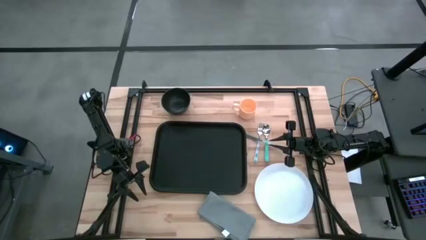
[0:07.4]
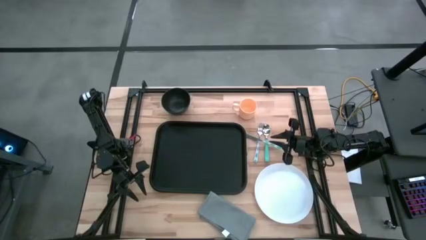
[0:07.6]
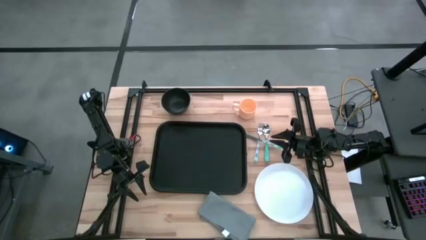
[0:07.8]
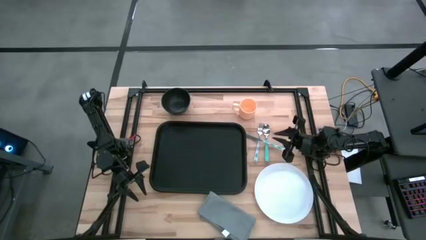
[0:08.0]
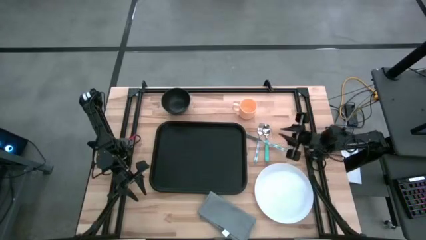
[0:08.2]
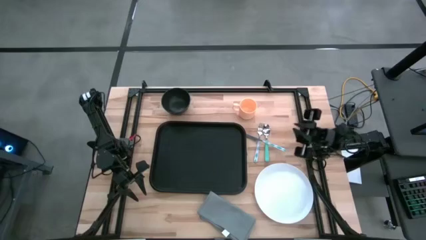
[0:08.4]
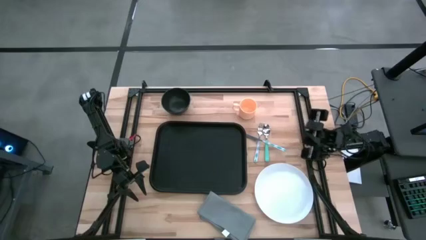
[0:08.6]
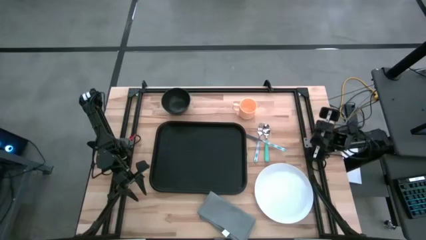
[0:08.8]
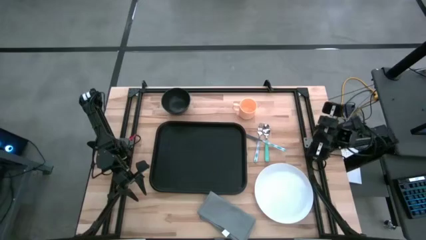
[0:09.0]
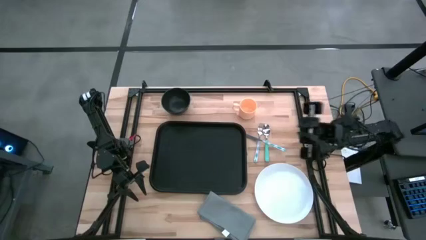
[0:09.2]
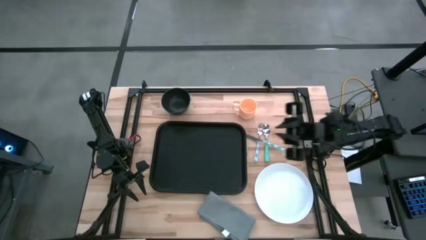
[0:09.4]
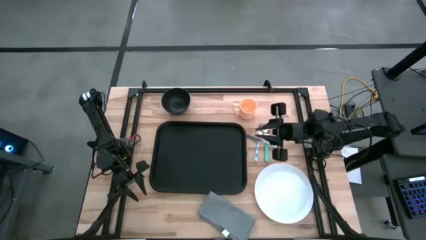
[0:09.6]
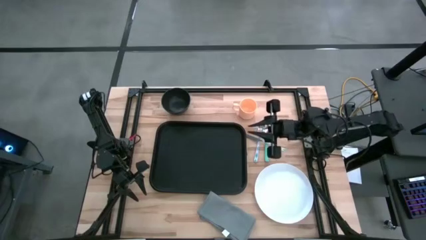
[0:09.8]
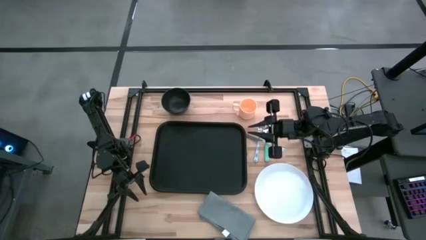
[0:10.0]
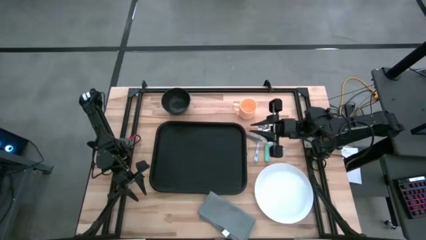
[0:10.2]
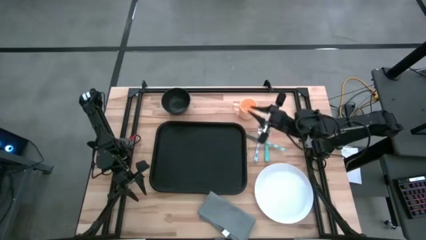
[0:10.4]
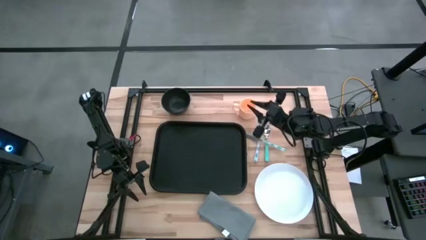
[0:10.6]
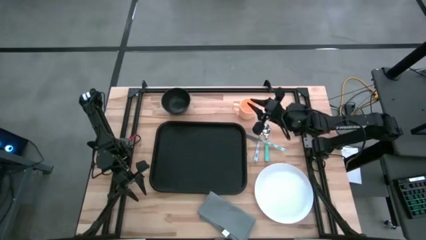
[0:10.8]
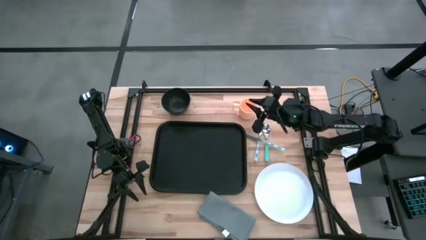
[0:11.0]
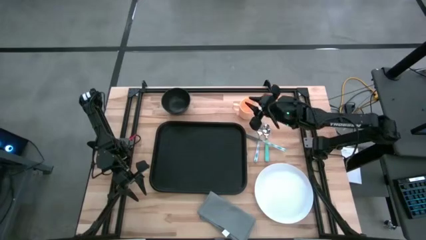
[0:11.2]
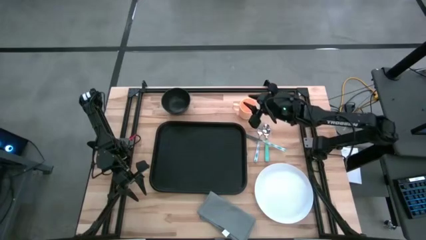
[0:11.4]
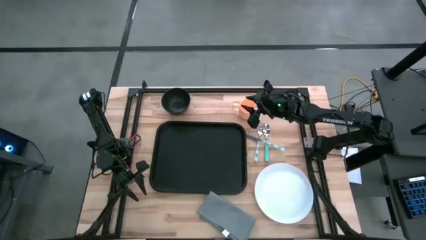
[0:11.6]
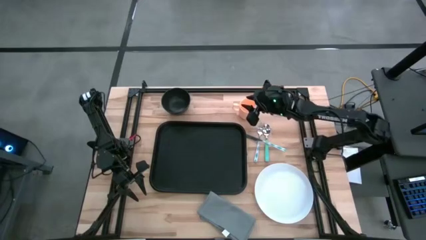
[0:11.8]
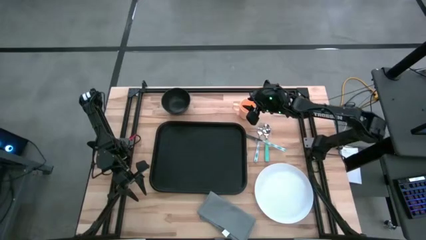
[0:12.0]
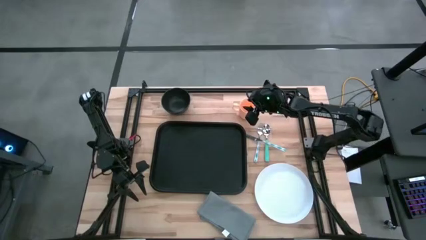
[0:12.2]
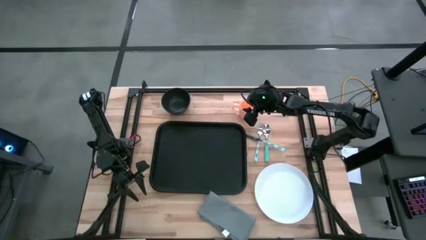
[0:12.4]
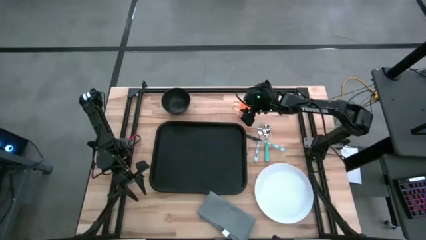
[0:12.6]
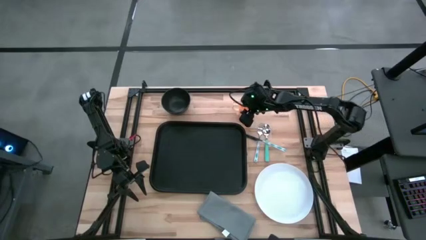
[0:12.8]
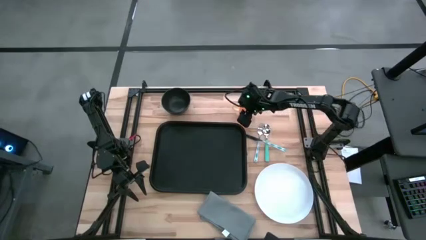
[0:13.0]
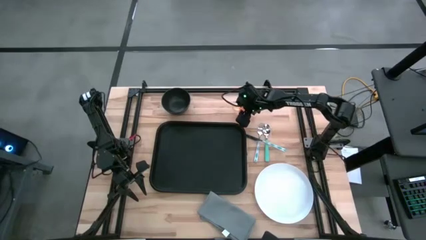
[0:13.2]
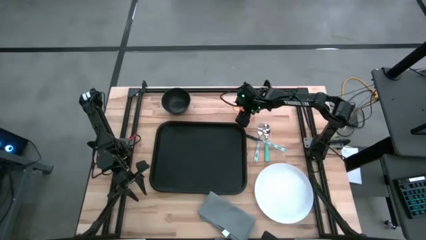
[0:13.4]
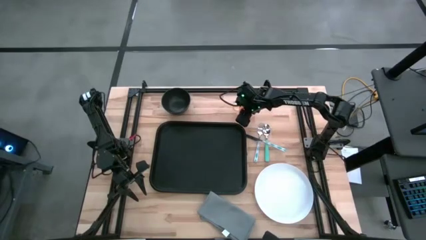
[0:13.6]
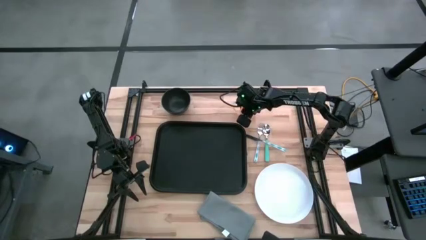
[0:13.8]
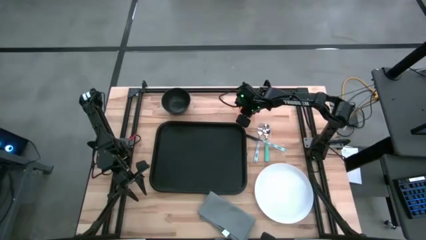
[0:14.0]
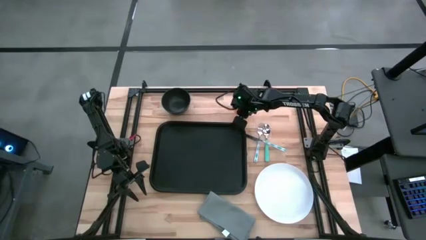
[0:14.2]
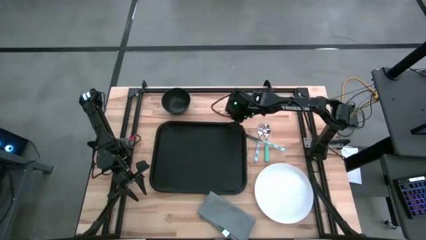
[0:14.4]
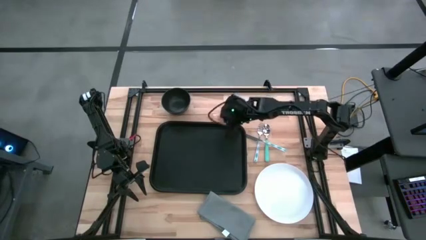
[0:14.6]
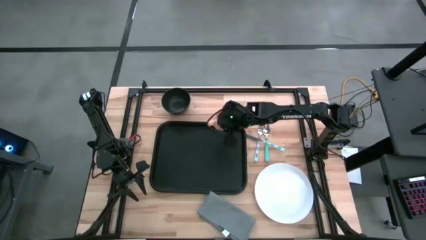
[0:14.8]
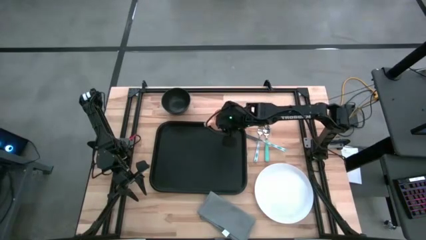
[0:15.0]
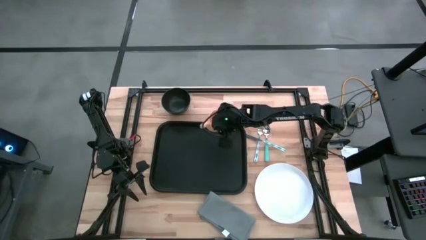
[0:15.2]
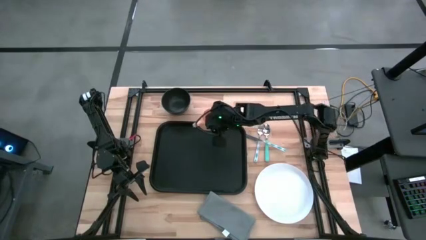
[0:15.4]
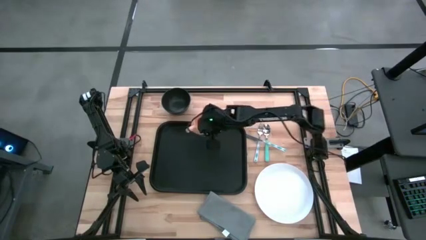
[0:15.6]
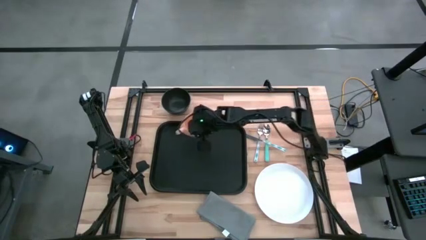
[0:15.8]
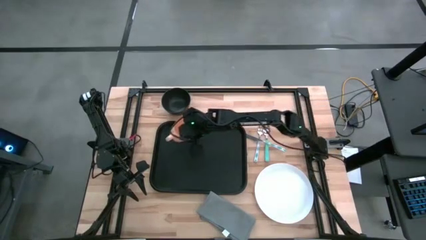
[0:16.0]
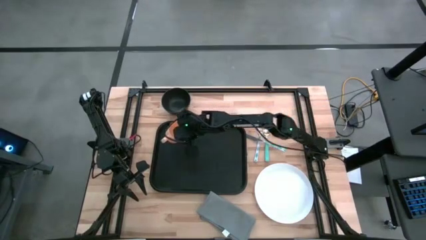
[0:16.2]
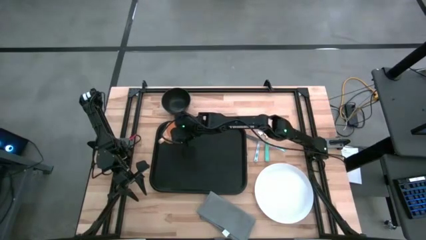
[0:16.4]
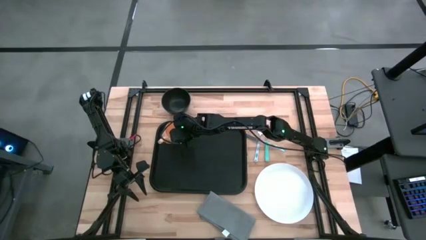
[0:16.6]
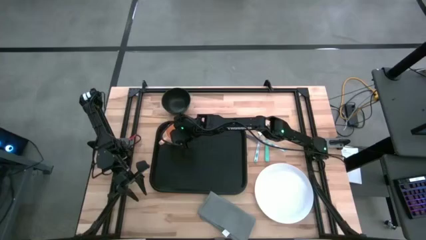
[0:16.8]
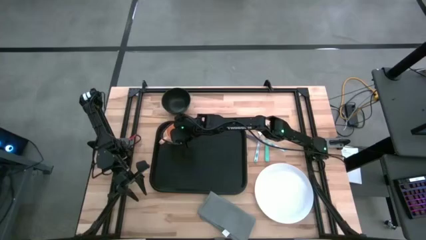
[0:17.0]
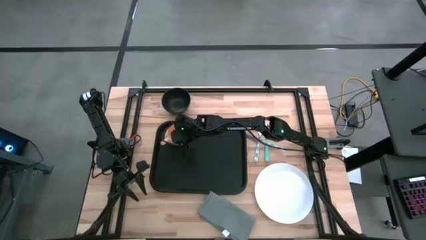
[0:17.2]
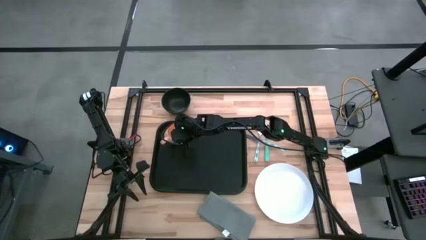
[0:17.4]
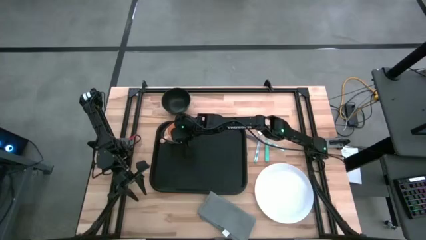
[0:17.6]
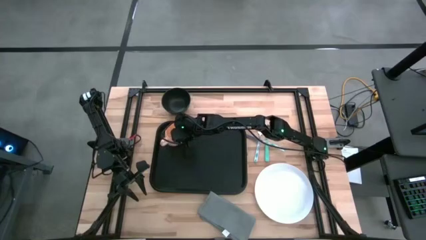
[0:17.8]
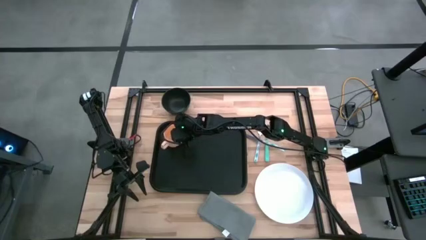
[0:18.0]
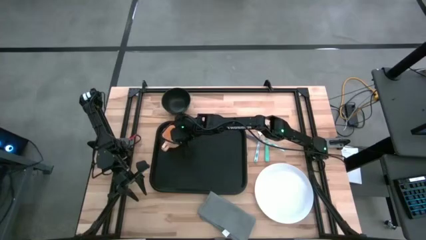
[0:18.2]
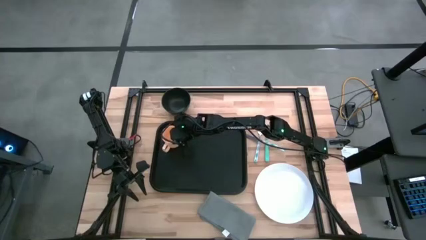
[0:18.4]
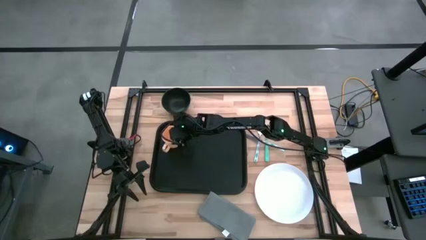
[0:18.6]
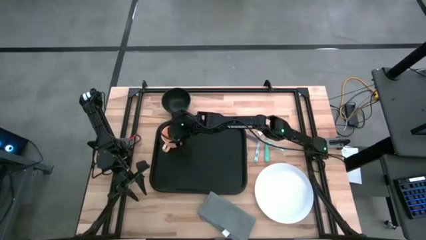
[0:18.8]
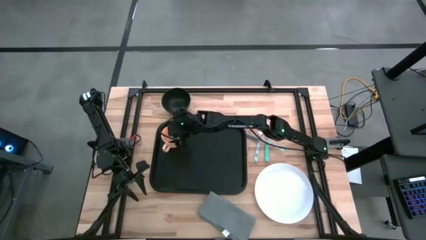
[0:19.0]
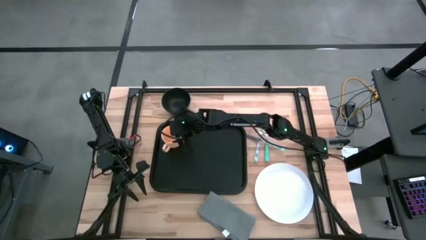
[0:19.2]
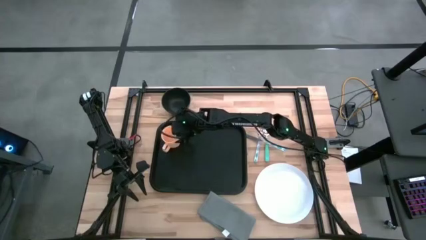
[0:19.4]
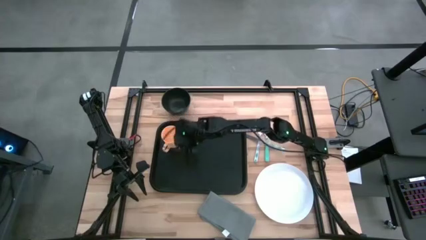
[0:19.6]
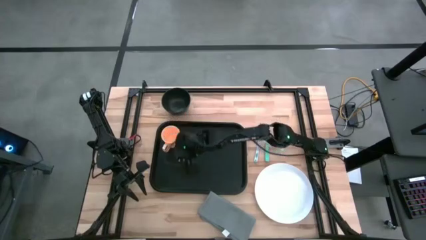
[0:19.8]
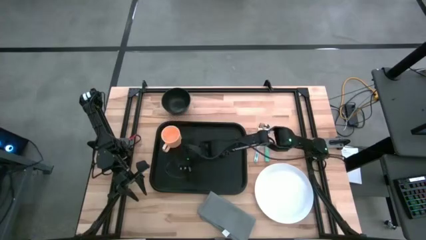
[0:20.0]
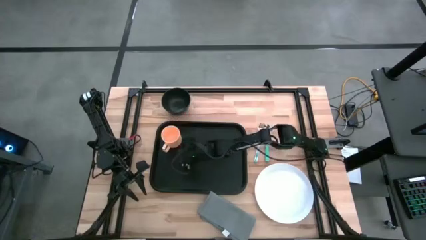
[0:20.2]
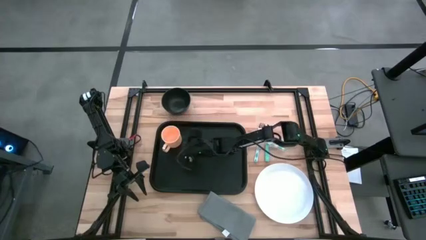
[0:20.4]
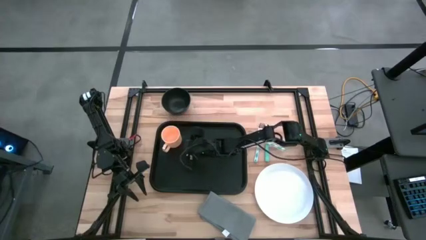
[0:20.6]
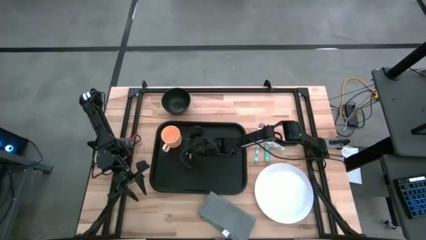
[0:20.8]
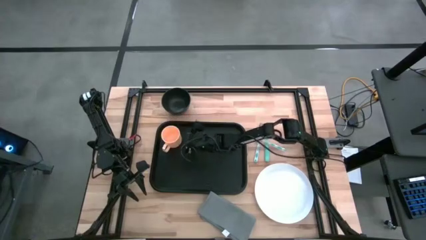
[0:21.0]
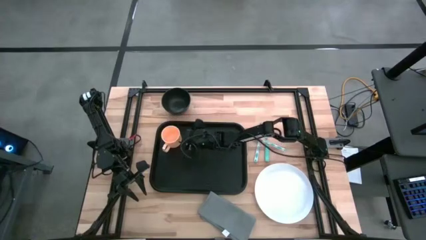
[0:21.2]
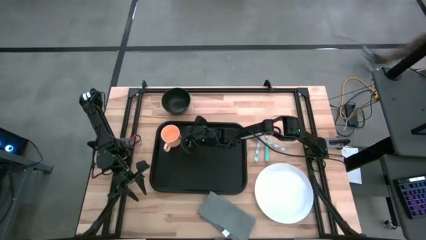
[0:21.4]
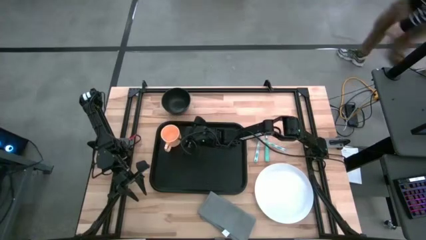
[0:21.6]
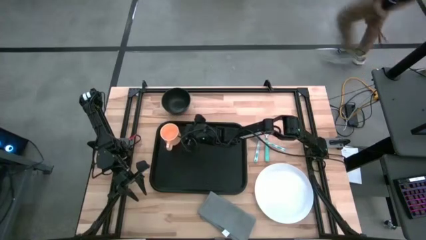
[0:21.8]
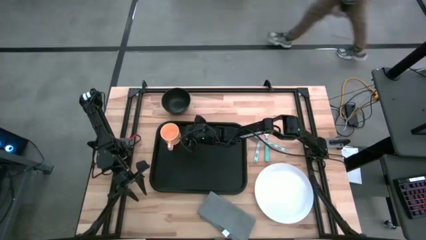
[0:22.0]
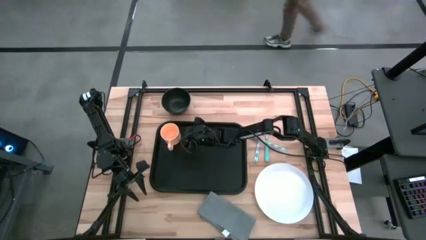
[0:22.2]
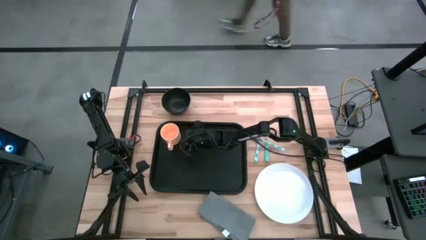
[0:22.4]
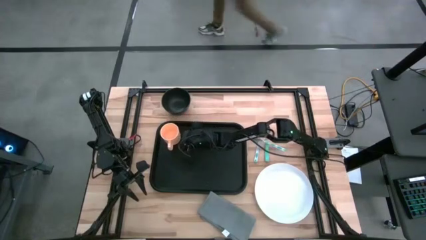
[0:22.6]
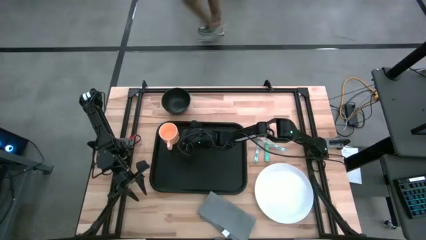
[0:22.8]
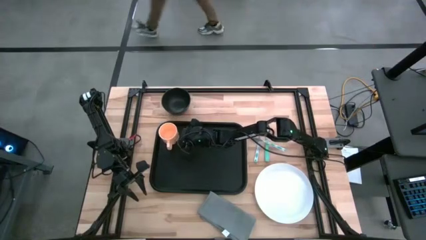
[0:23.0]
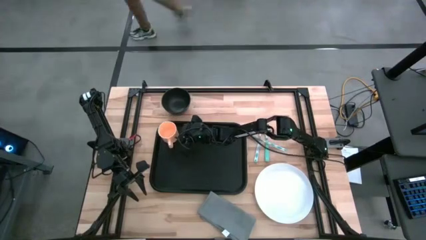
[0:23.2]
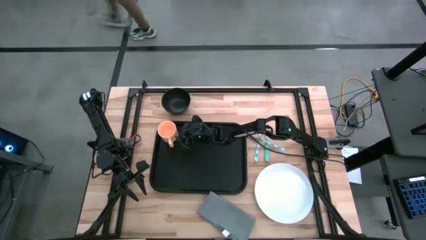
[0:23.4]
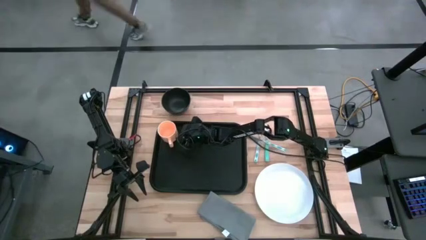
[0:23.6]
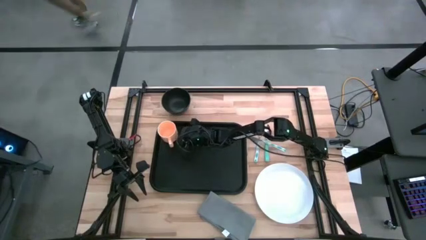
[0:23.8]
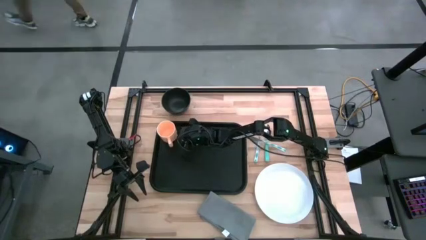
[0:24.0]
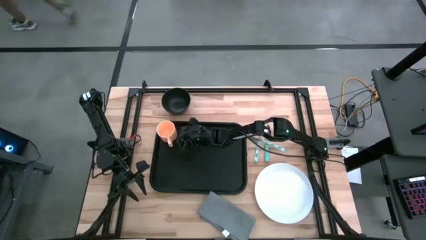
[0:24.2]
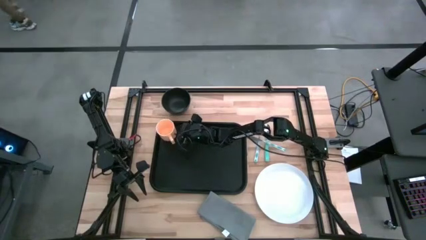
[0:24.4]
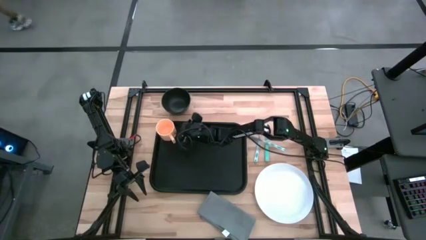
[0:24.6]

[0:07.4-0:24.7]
Task: Set up tray
Put the orange mug on the top left of the black tray
